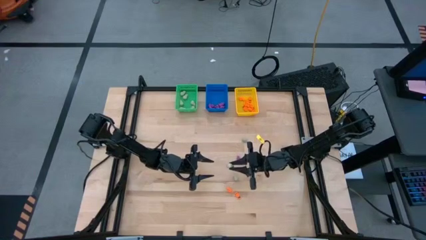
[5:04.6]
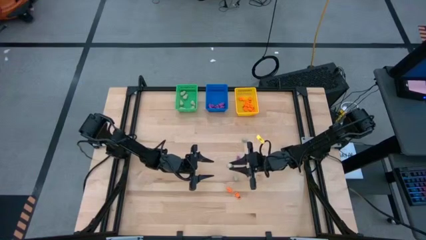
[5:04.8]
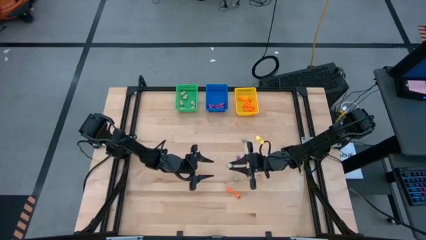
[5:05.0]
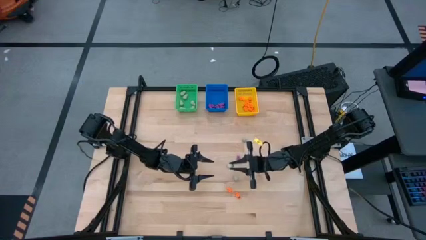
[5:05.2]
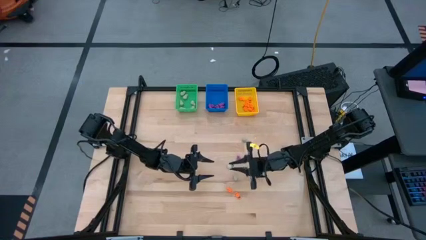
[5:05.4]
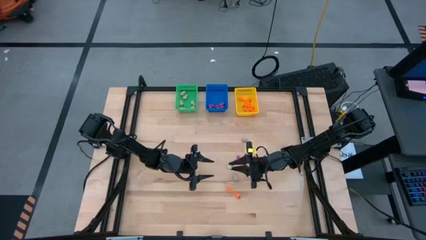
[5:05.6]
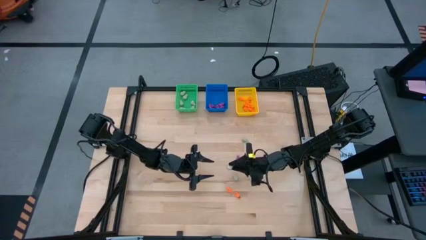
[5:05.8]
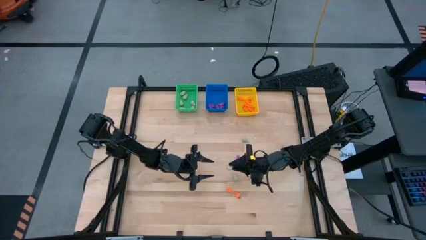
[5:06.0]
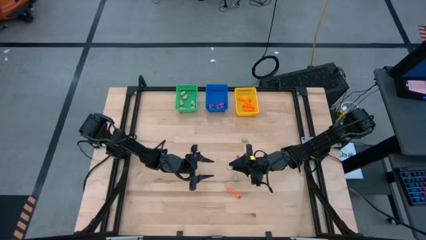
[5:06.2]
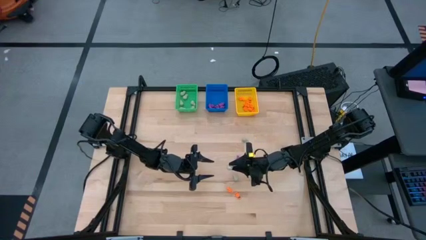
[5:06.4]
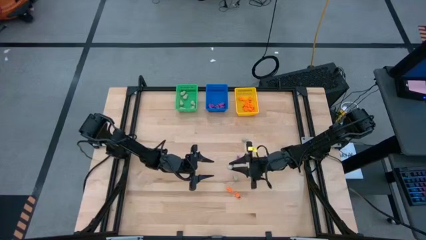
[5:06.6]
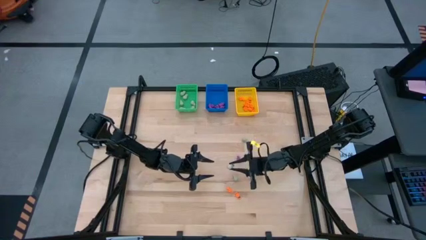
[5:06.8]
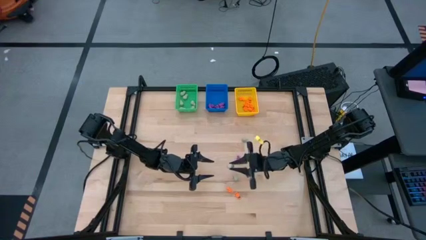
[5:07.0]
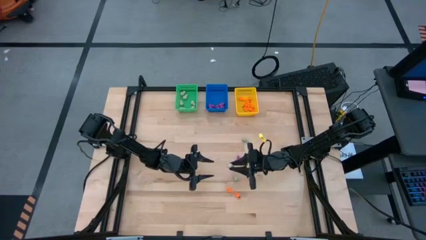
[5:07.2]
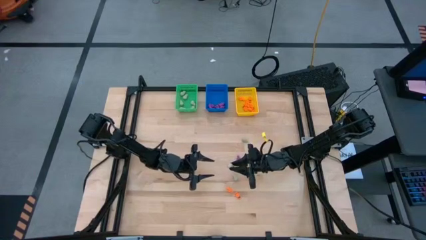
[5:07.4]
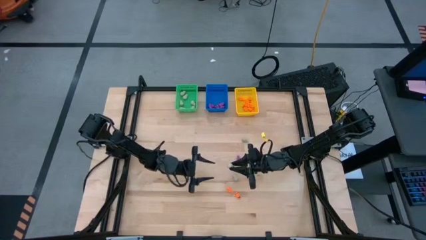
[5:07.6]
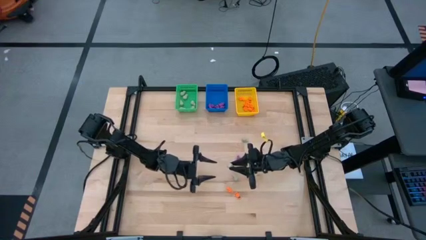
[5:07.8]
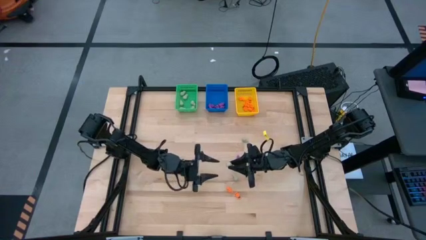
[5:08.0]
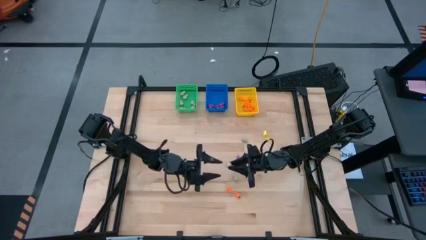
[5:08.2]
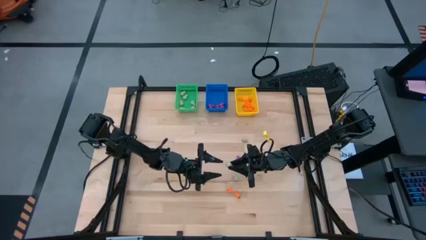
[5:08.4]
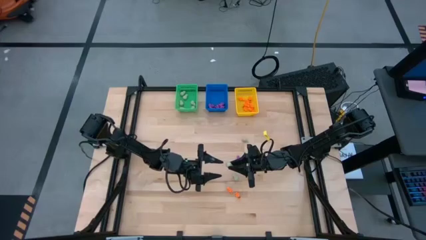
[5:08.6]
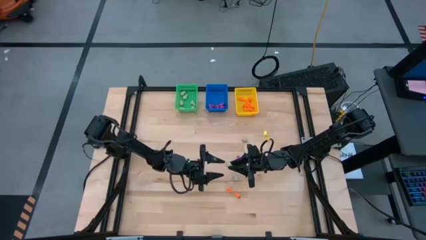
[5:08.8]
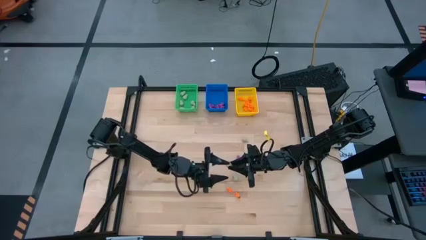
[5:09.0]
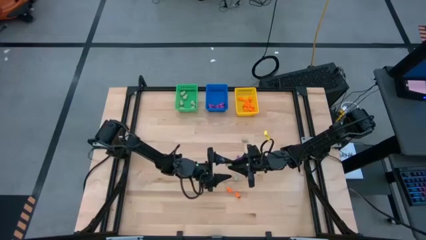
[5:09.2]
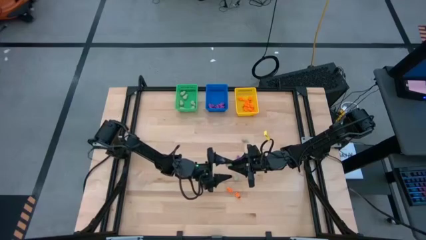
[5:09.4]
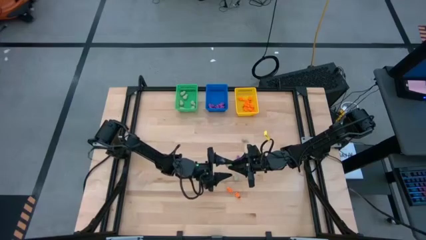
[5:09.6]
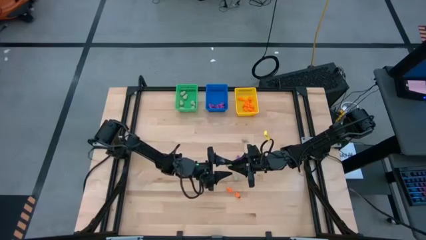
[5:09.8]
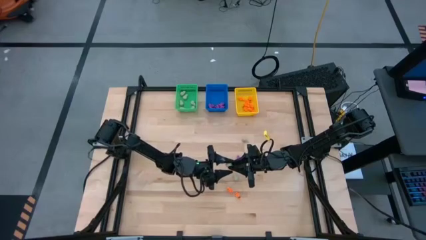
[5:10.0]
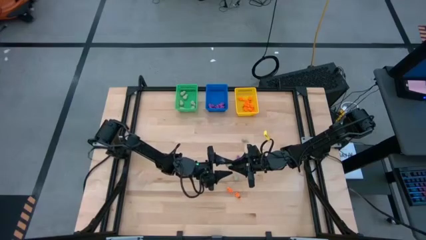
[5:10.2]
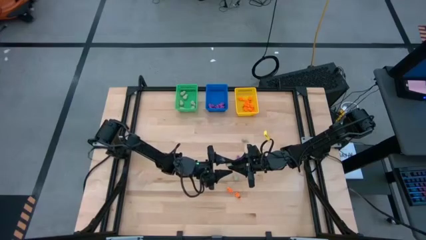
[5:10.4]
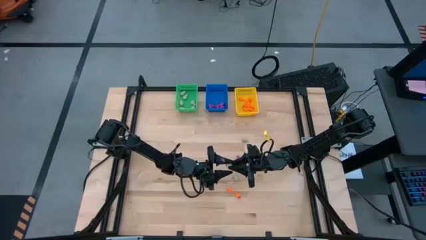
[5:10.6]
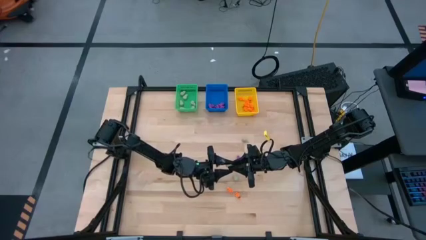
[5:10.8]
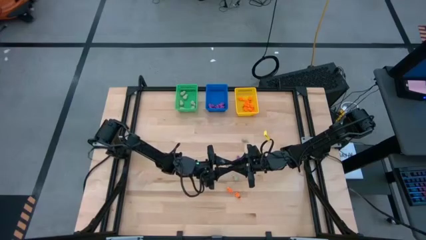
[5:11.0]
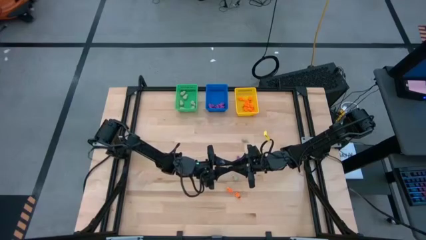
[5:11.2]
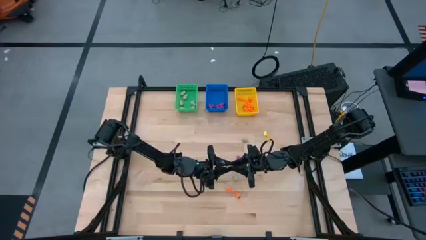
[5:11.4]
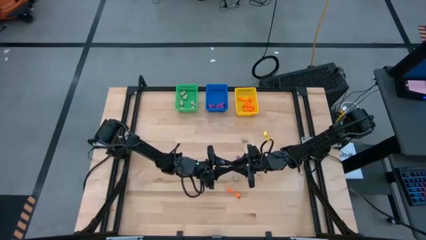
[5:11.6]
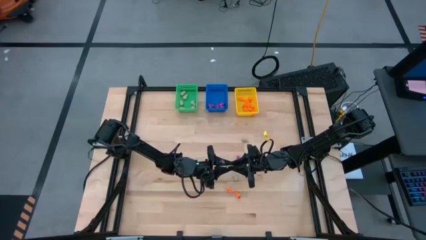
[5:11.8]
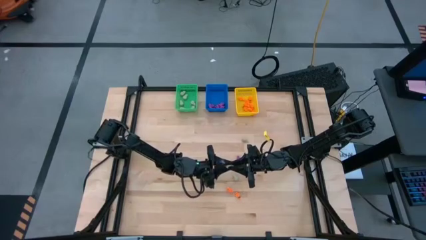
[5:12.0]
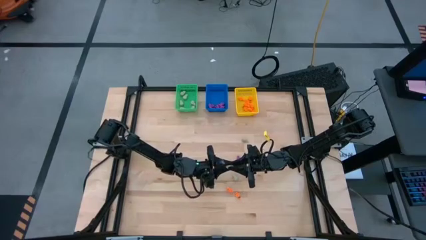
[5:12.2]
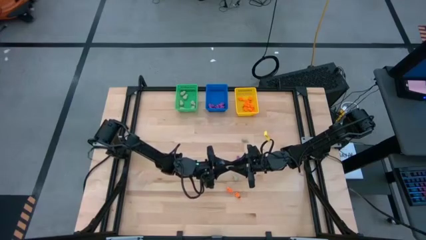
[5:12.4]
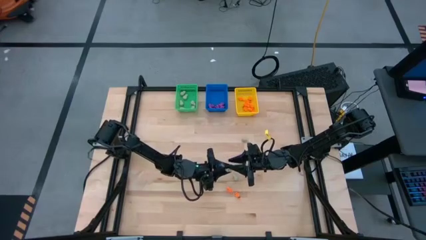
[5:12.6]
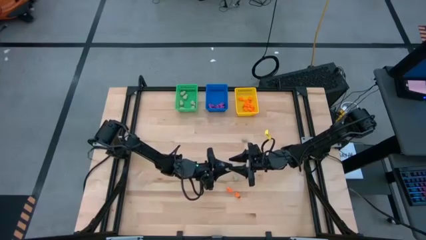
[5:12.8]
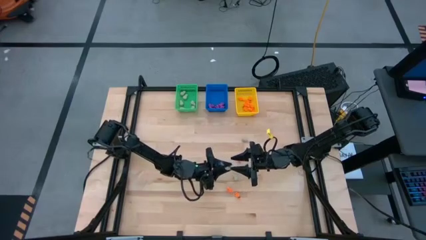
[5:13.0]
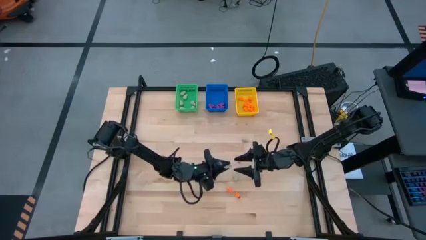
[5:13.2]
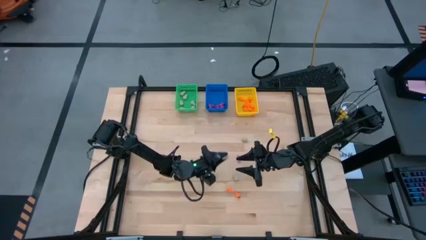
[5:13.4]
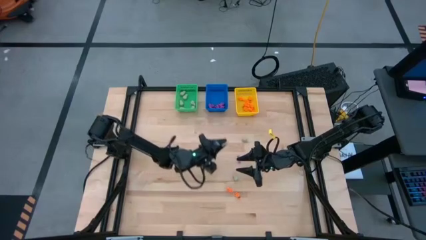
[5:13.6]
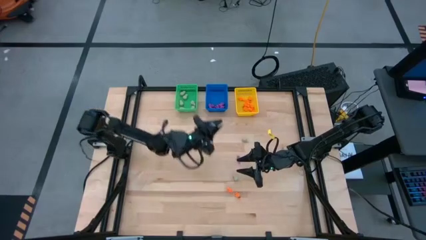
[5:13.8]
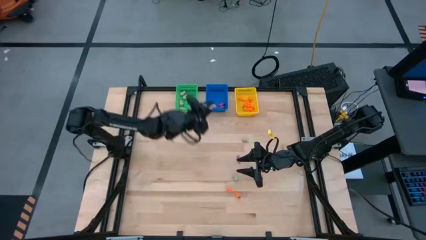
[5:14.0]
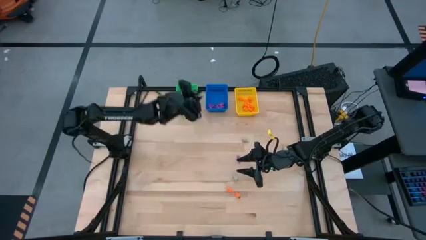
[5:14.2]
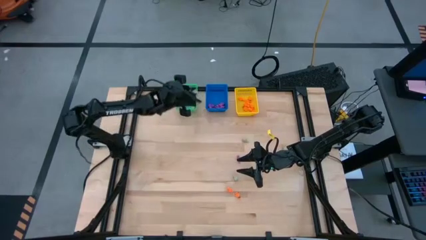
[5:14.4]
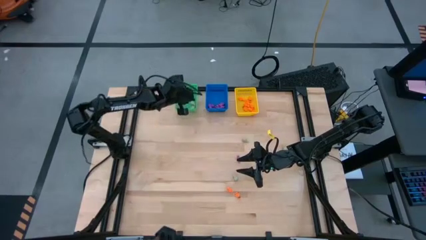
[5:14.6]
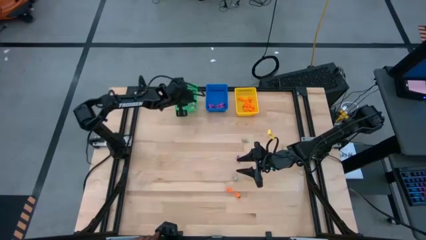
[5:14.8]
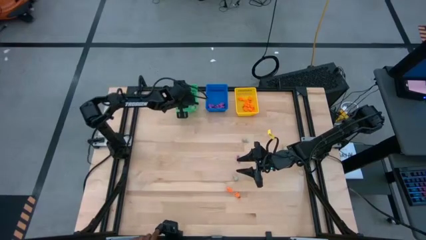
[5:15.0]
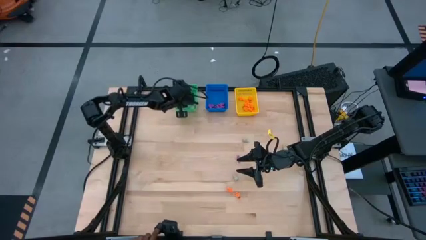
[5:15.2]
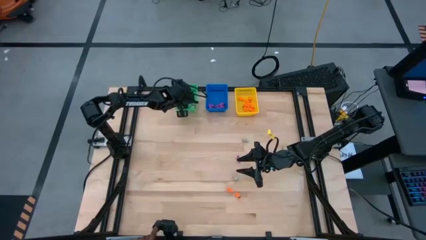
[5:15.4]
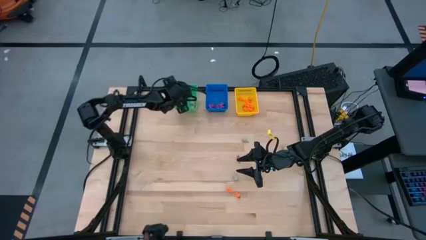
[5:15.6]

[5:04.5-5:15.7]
Task: Sort Halloween decoration
Put the gray skull toy into the green bin

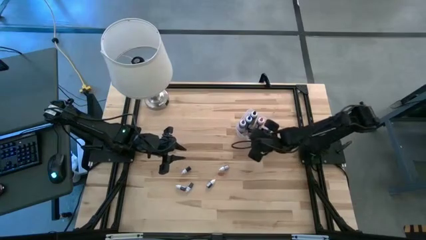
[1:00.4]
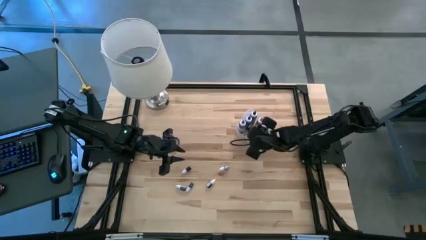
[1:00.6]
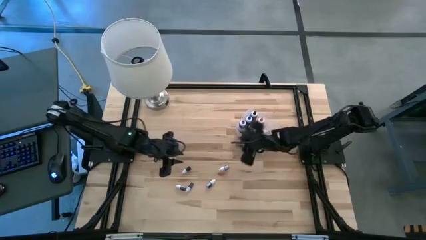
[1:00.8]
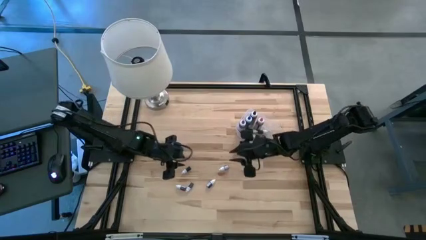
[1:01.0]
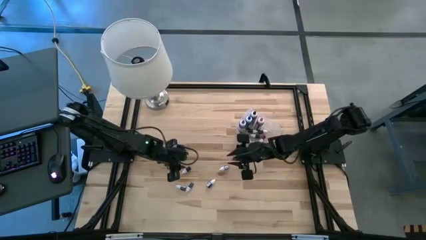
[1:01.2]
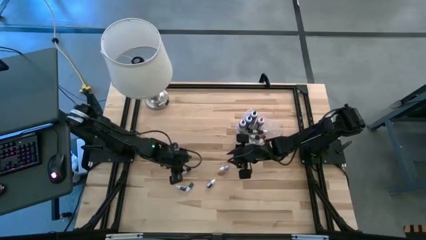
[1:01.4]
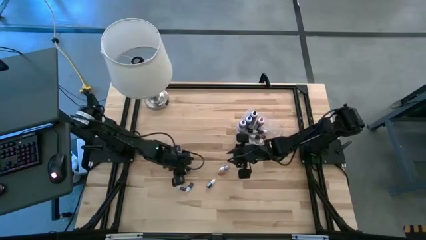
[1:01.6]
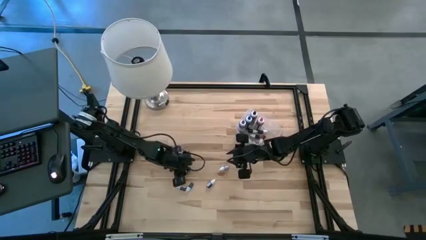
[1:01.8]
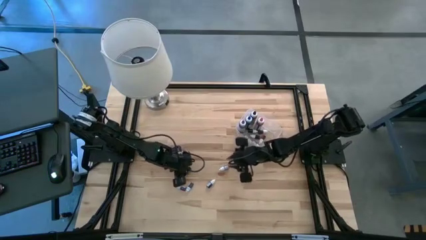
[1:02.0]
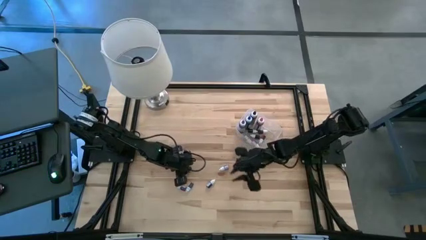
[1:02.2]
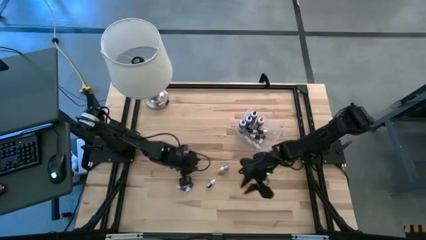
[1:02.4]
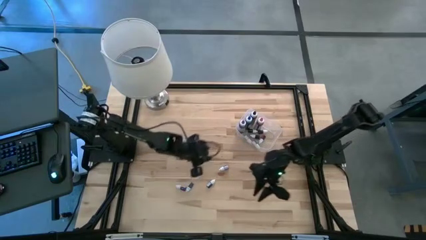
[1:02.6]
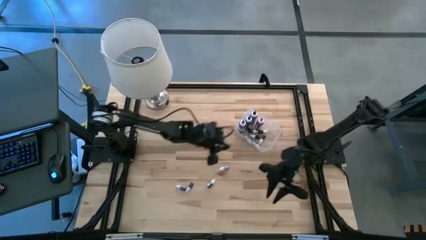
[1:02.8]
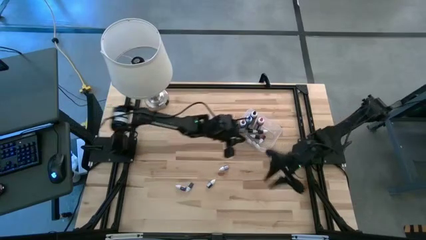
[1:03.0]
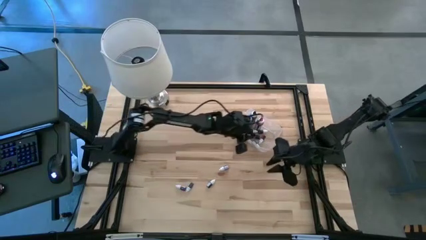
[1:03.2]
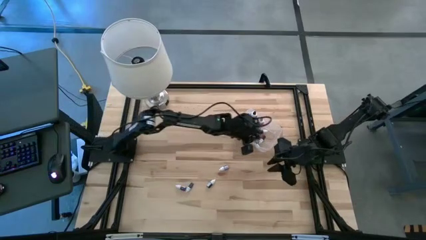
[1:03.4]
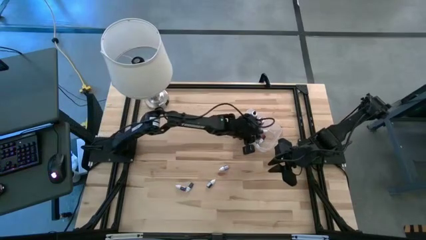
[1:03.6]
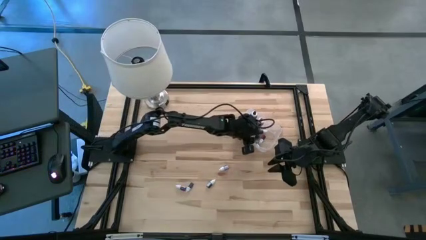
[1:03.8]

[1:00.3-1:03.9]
Task: Pick & Place food coloring
Put the small green food coloring bottle into the transparent bin

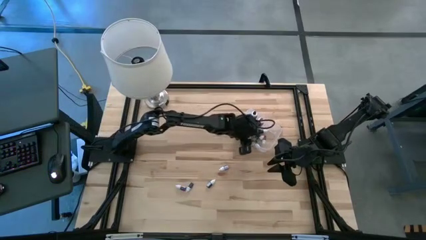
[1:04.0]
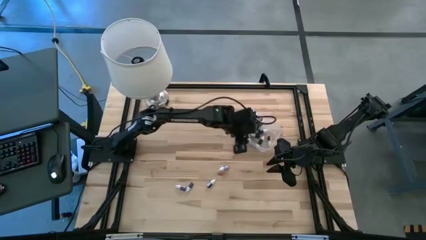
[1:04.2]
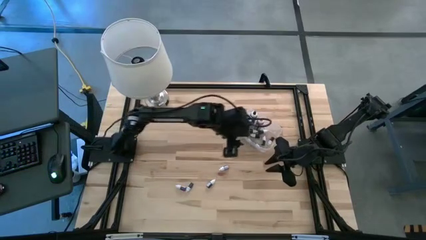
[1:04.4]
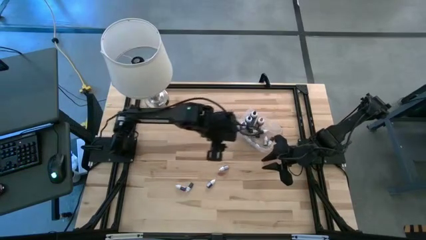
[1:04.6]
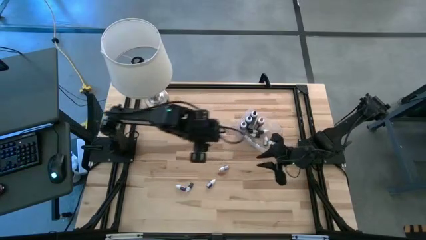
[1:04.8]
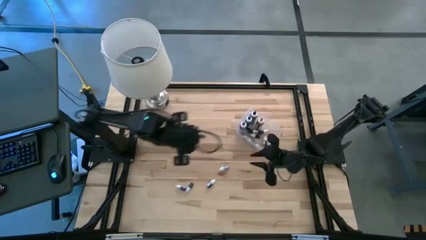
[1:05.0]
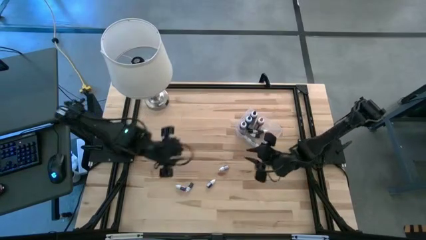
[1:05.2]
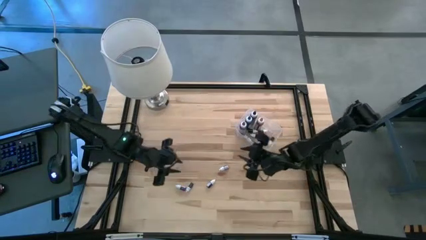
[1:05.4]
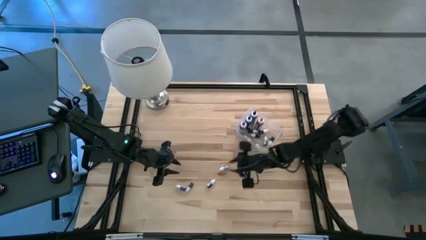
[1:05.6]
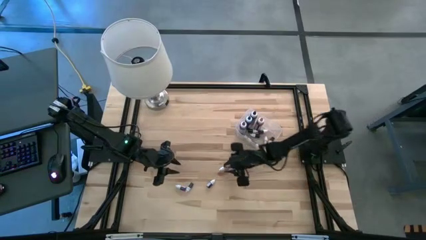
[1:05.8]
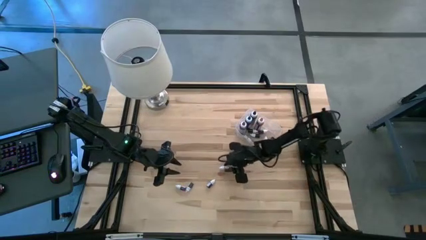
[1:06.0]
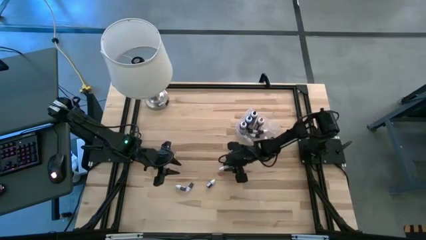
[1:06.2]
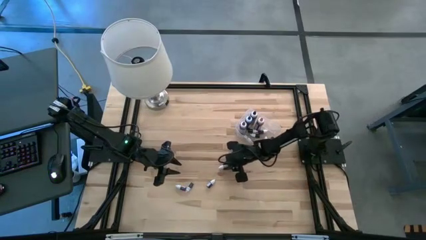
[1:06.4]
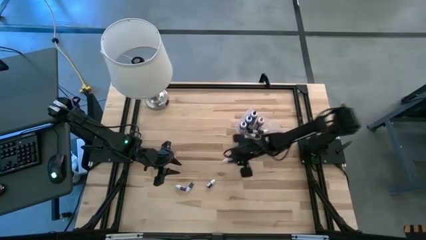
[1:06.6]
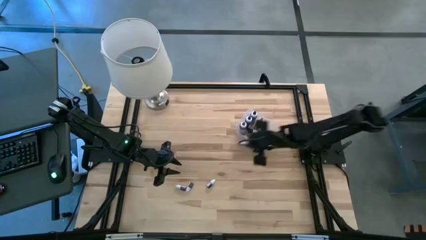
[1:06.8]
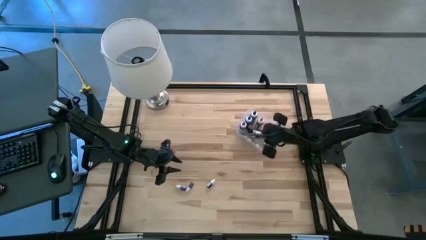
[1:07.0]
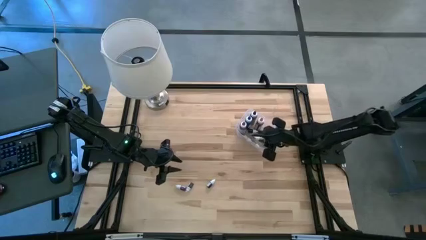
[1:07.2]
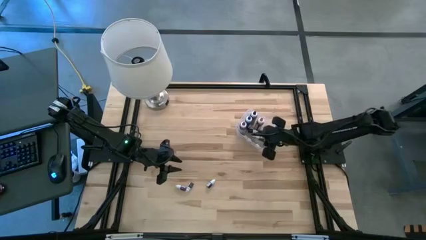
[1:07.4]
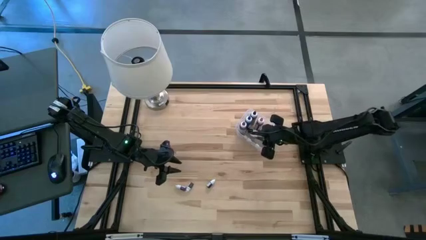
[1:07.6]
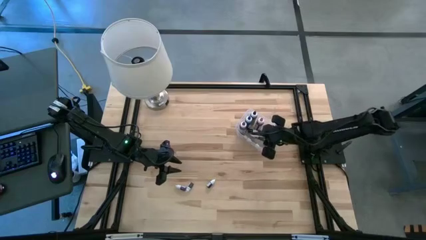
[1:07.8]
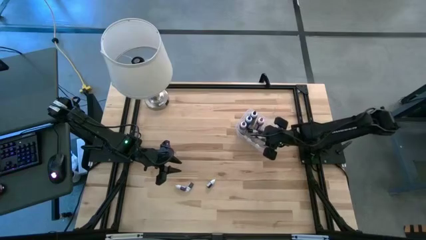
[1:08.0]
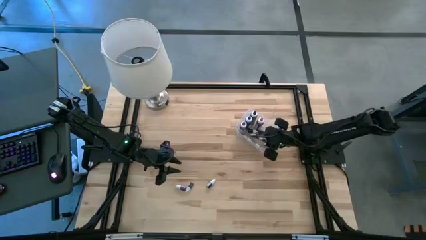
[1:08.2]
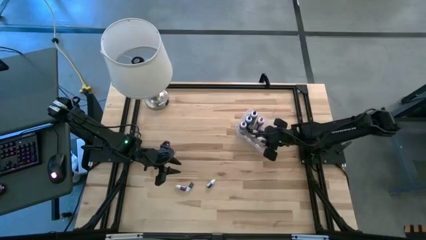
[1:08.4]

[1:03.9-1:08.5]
Put the small orange food coloring bottle into the transparent bin
